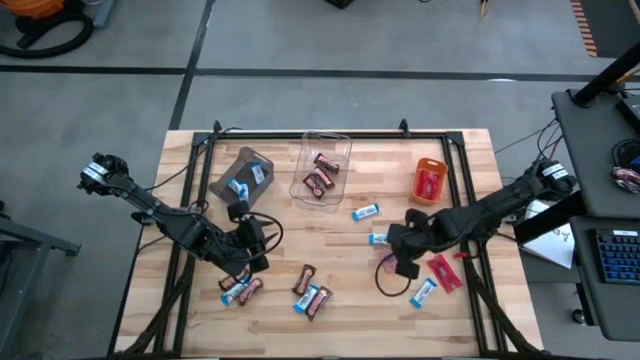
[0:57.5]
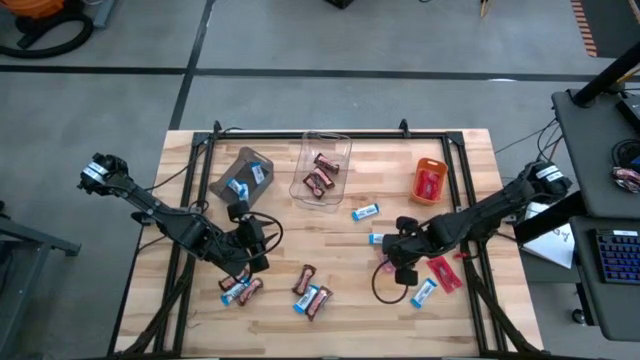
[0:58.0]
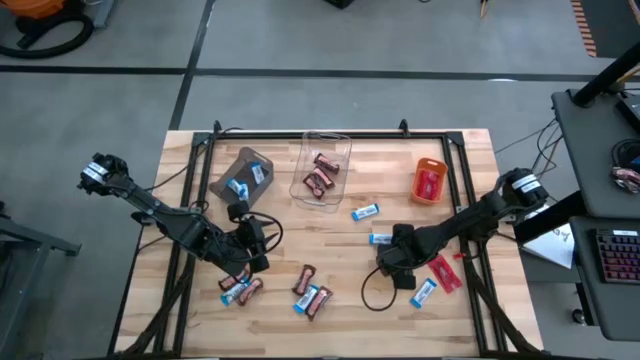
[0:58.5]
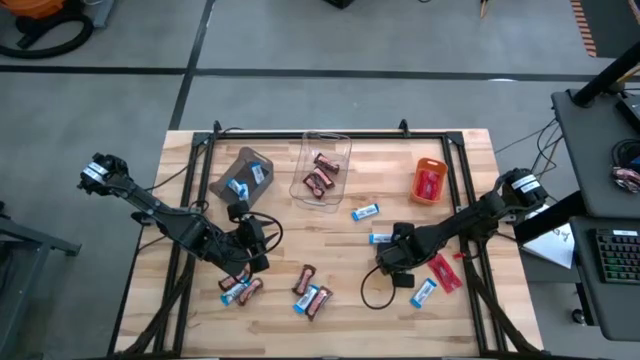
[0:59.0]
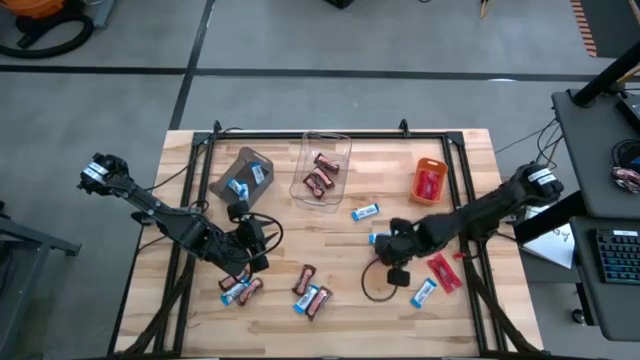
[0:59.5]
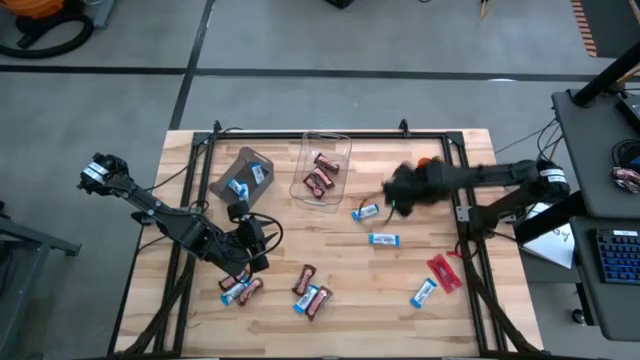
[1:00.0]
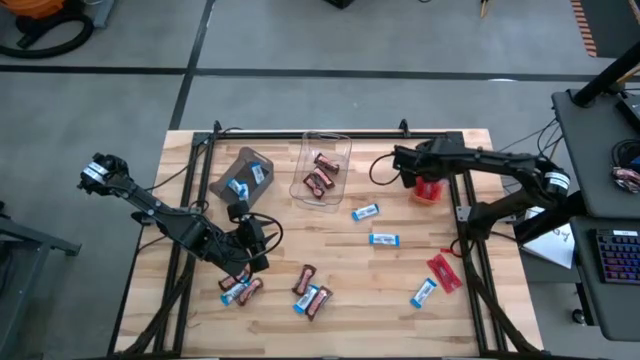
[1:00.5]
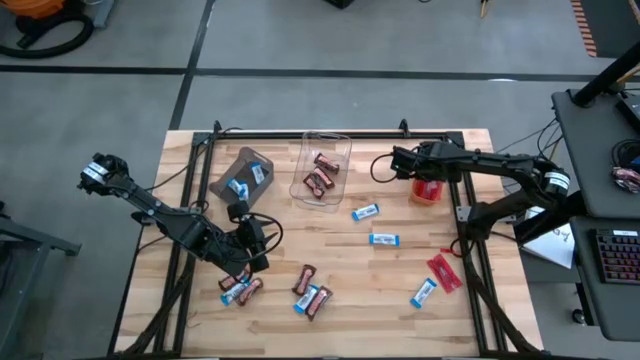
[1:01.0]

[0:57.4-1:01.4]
Task: Sort candy
Put the red candy into the orange bin

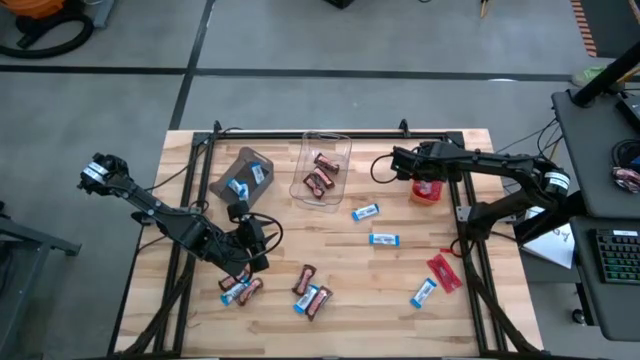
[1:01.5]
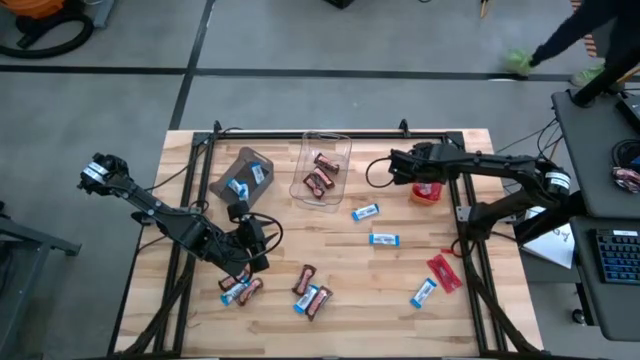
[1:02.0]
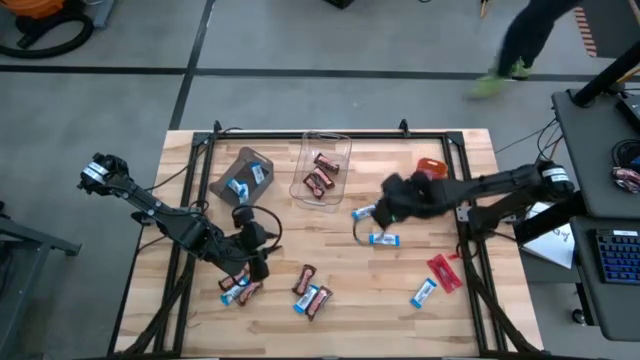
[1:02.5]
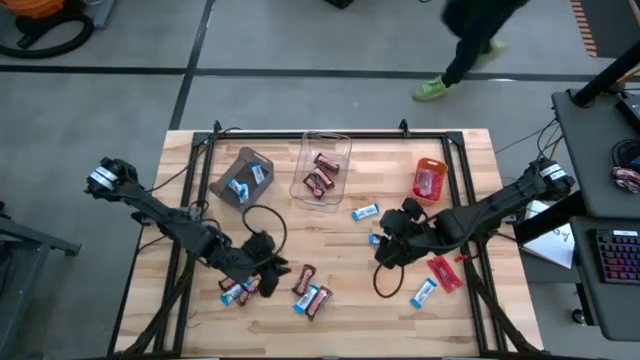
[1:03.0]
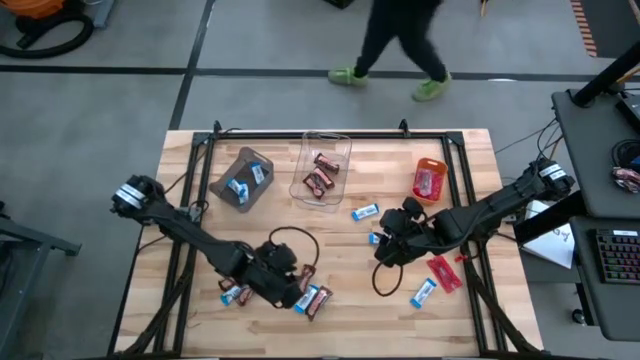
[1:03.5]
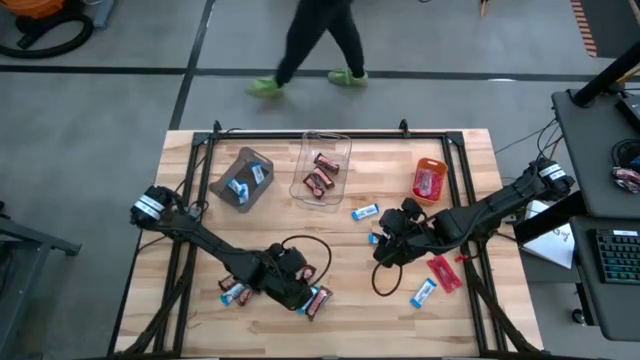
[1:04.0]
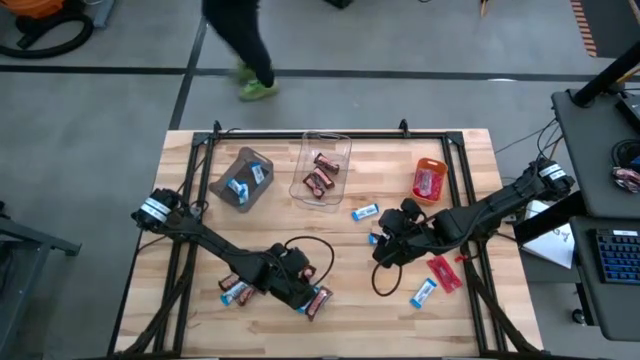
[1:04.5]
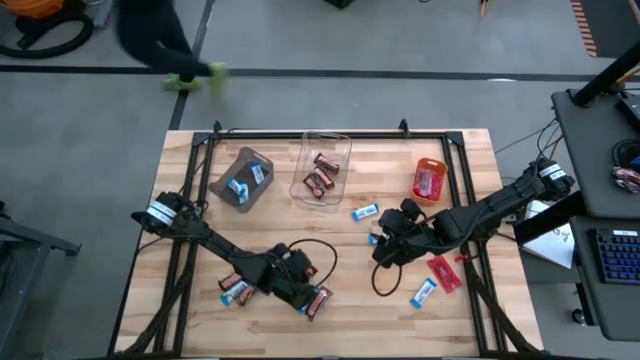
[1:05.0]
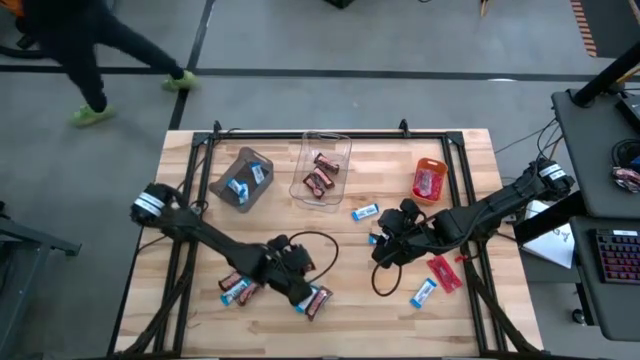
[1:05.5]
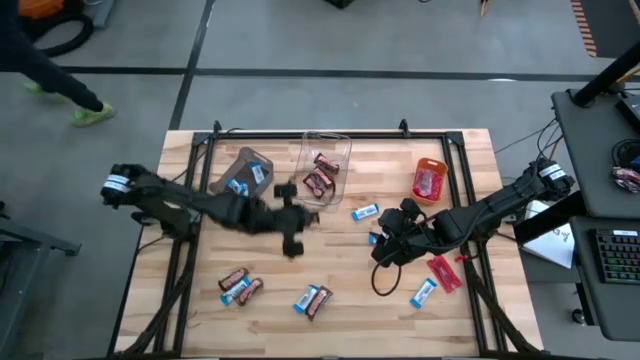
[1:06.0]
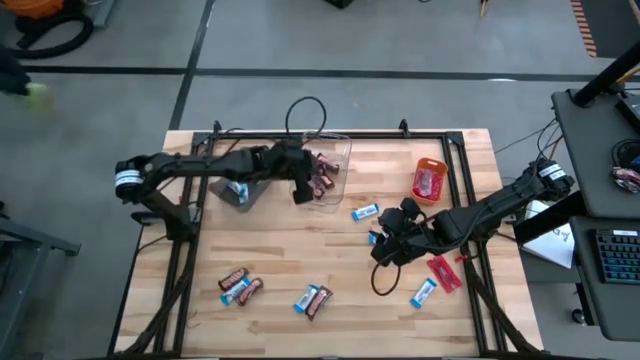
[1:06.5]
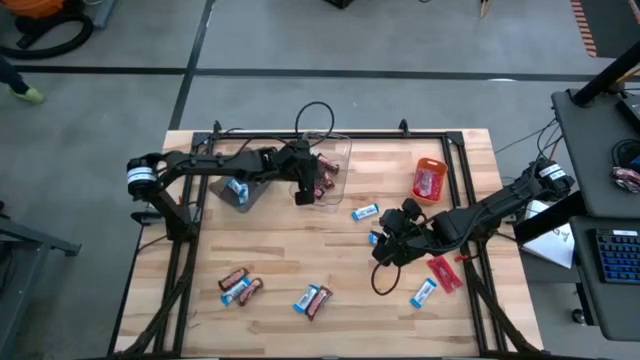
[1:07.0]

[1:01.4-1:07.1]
Put the brown chocolate into the transparent bin

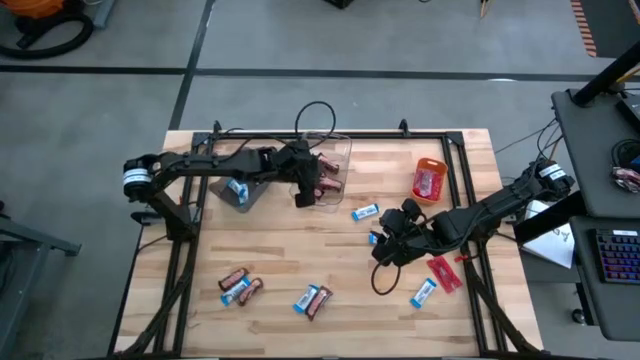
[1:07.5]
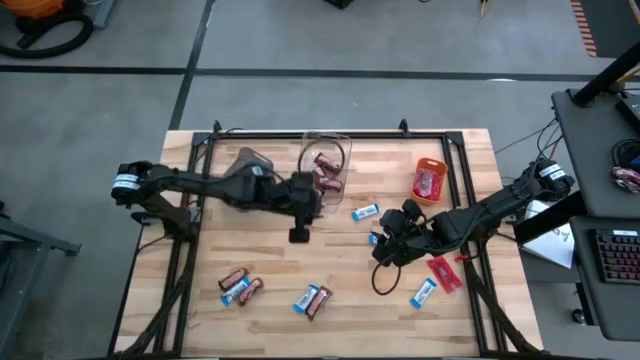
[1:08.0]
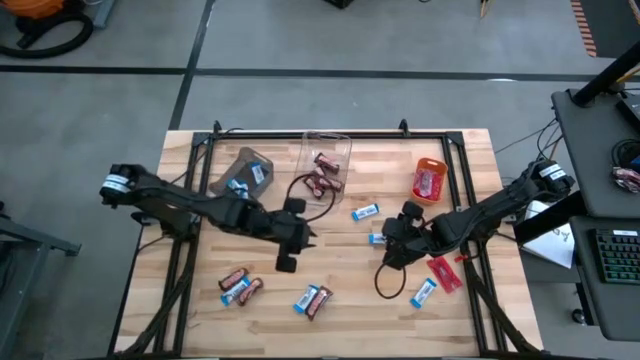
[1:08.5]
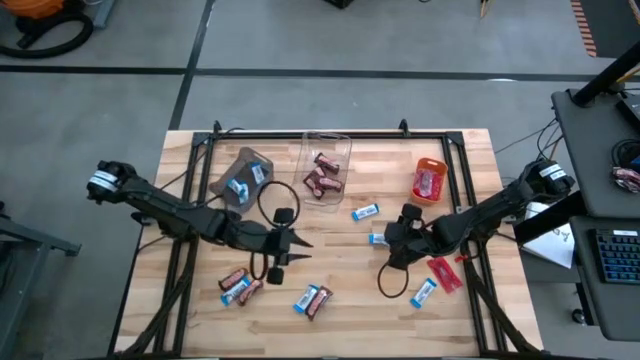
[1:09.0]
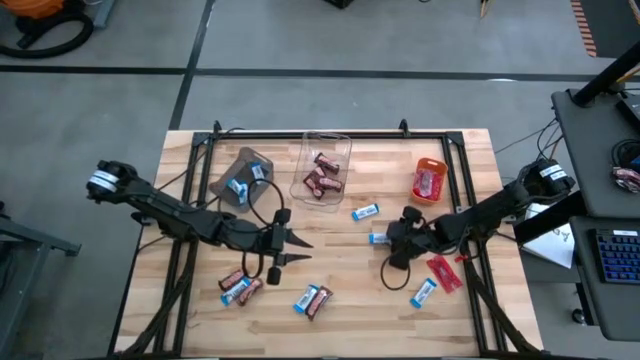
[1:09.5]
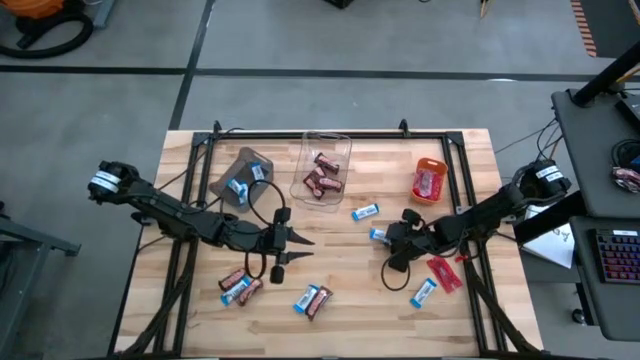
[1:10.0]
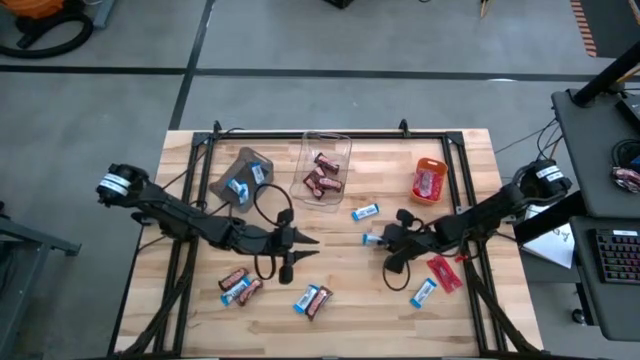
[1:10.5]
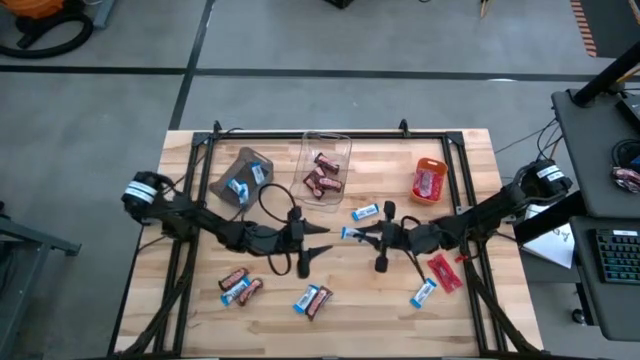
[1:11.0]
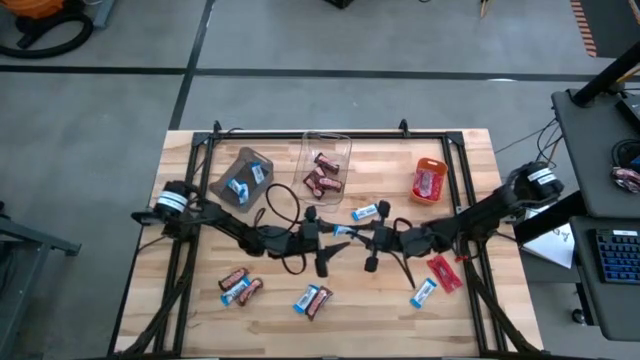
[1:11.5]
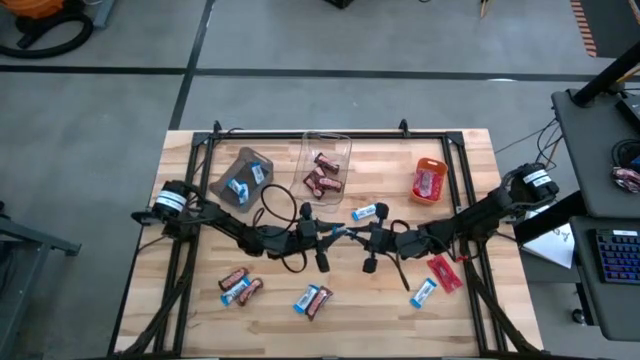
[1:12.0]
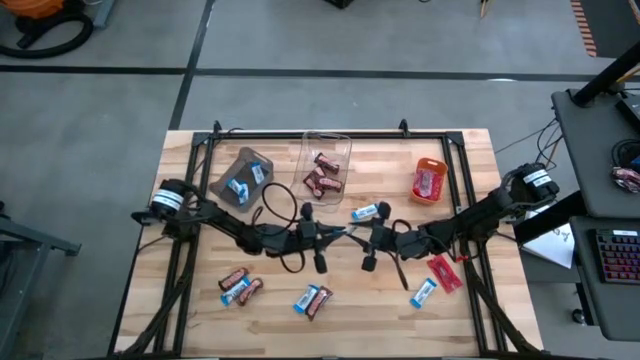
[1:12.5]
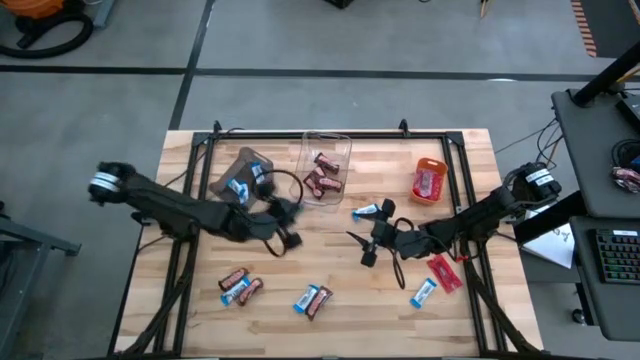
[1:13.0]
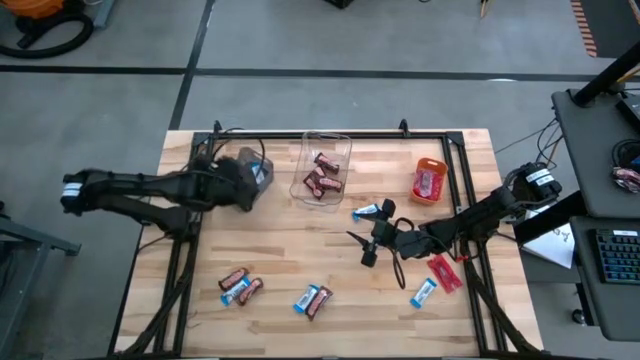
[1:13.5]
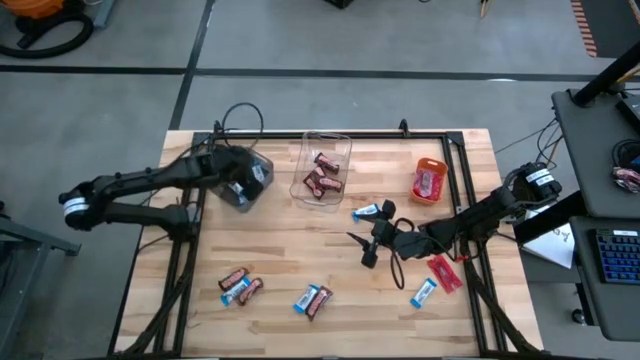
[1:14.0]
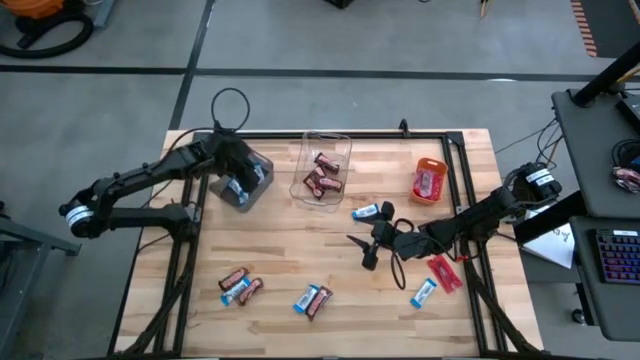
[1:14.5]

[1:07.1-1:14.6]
Put the blue chocolate into the black bin

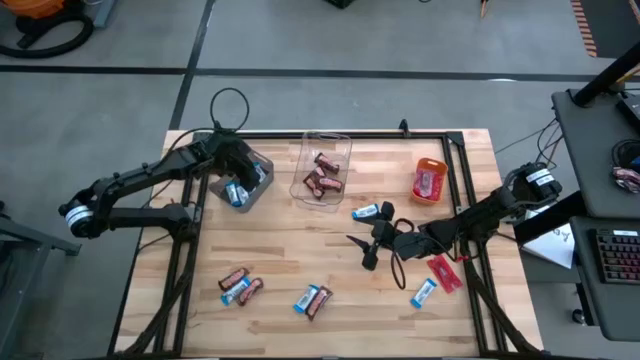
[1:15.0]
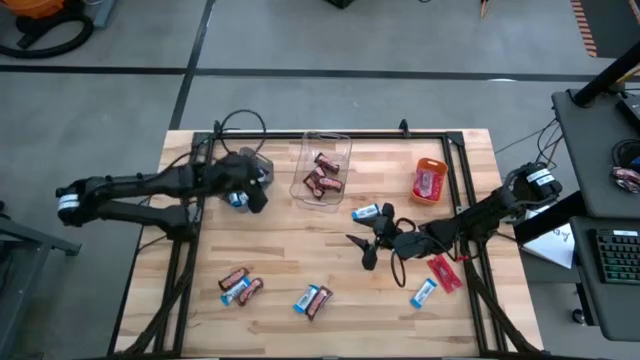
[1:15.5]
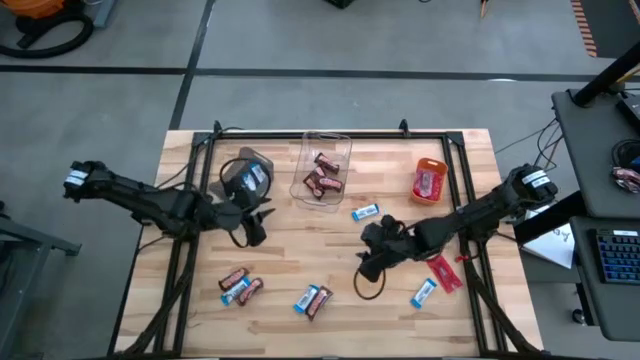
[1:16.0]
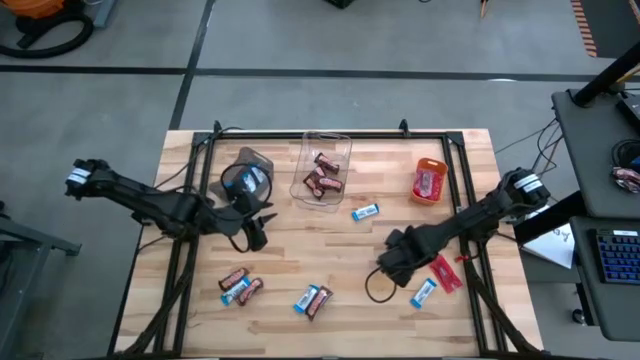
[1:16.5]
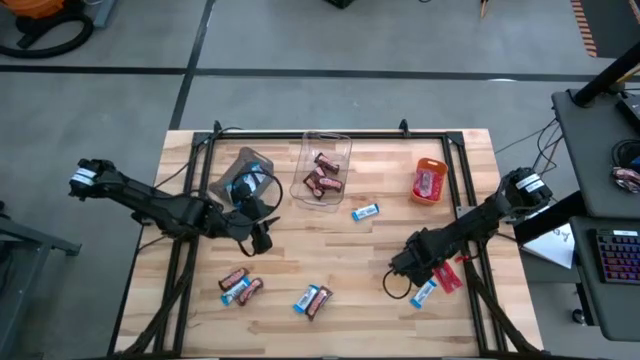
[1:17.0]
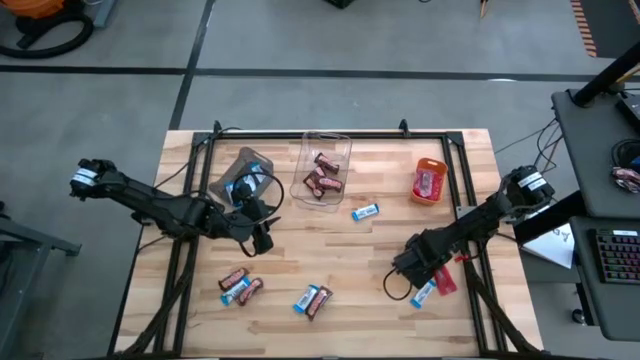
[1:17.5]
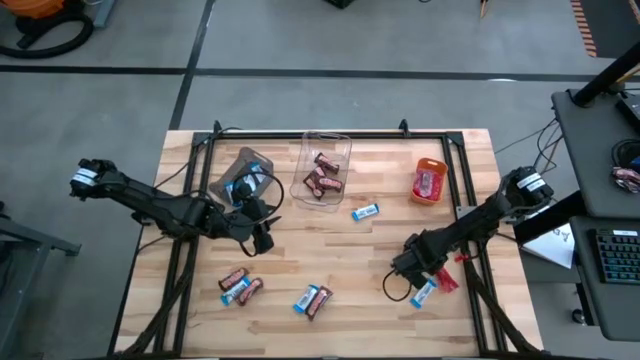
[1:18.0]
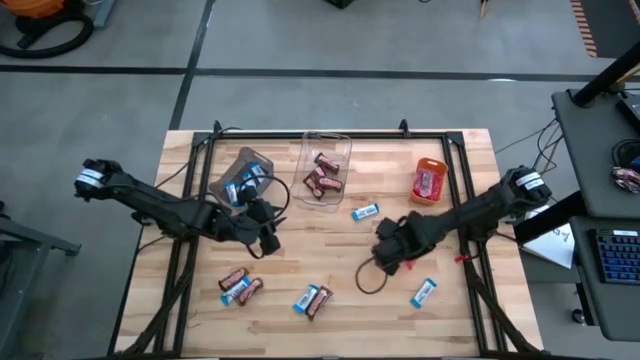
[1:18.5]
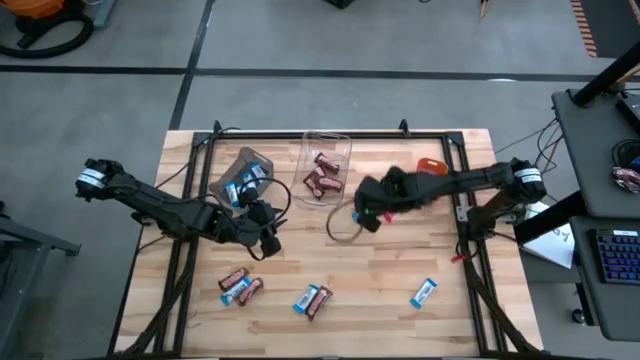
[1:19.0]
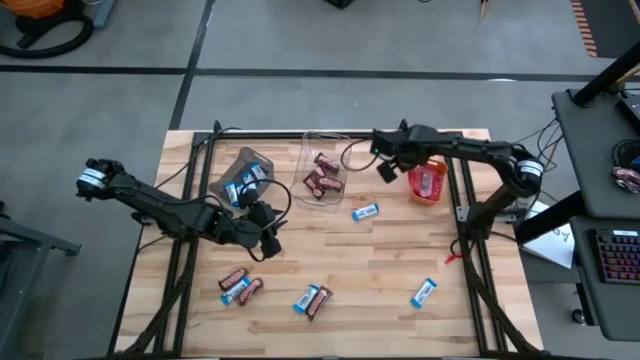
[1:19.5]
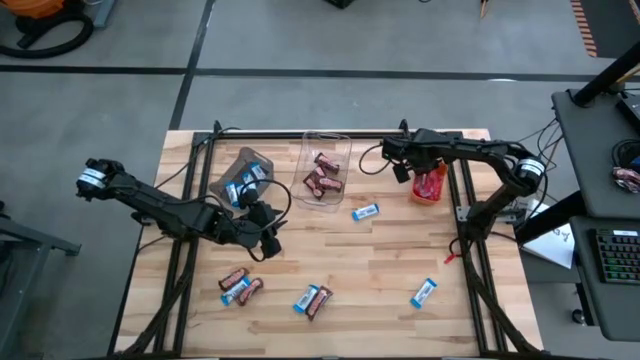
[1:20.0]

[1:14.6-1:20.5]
Put the red candy into the orange bin
